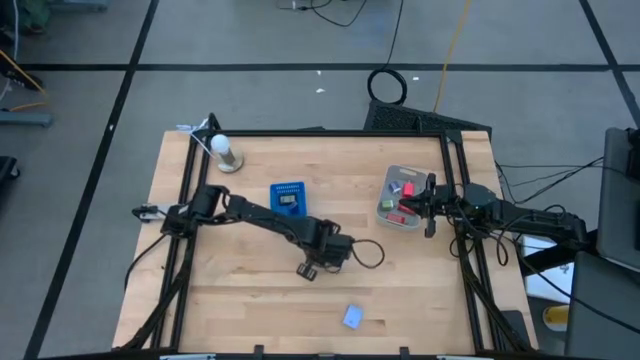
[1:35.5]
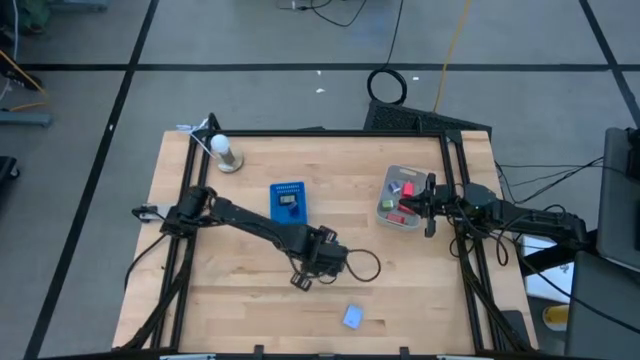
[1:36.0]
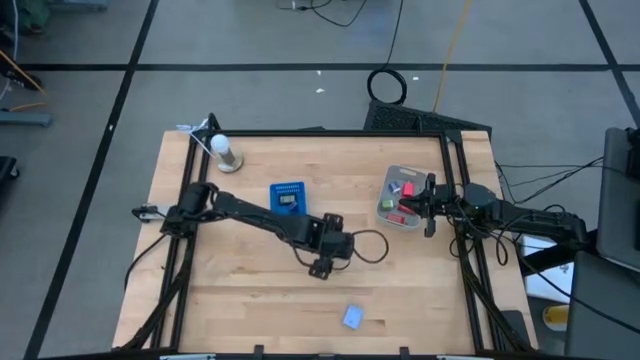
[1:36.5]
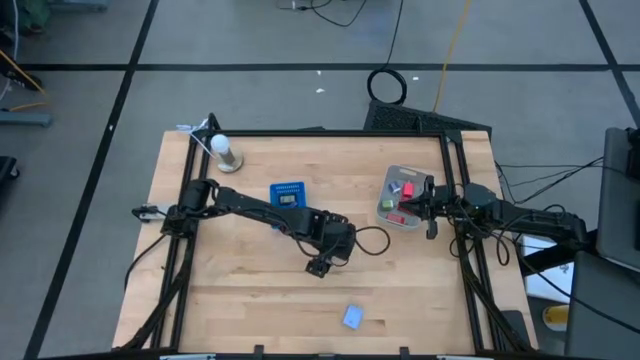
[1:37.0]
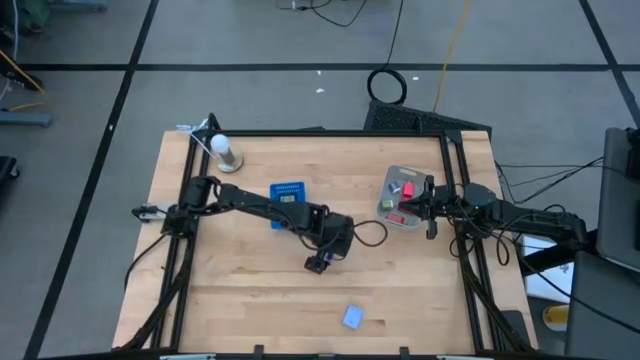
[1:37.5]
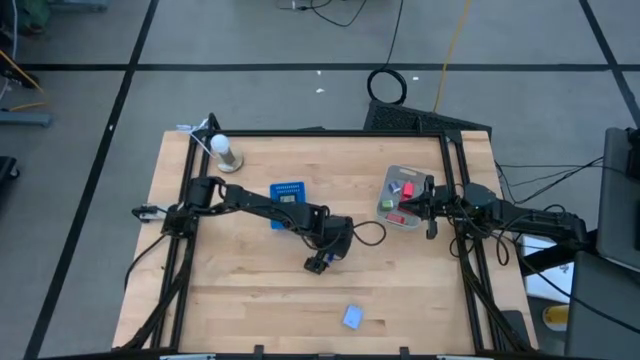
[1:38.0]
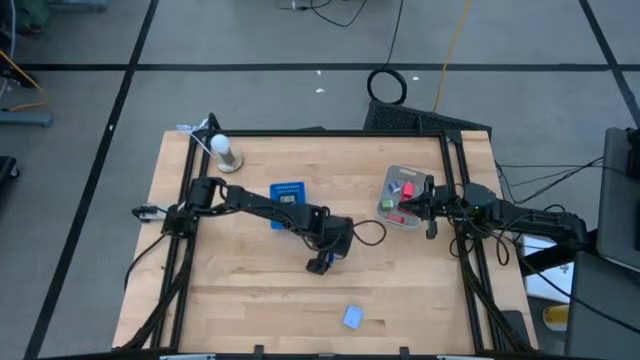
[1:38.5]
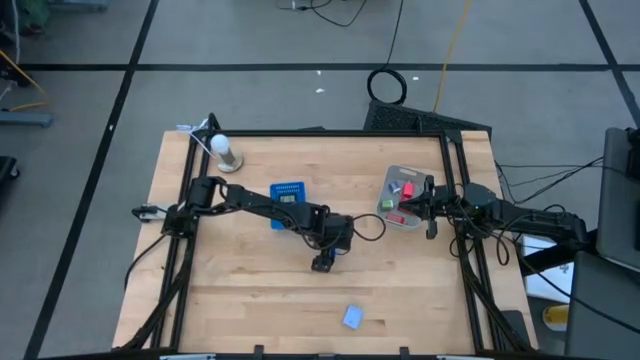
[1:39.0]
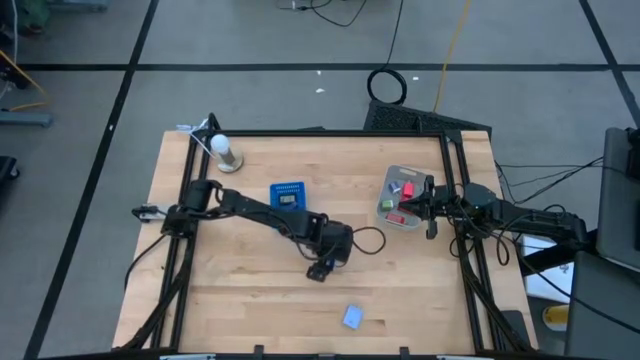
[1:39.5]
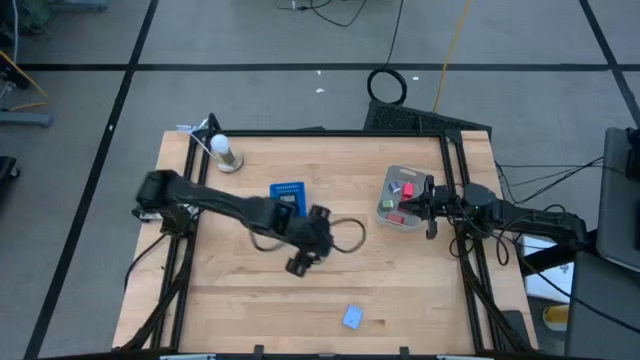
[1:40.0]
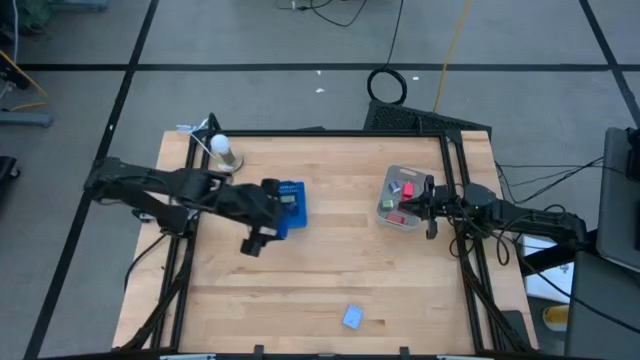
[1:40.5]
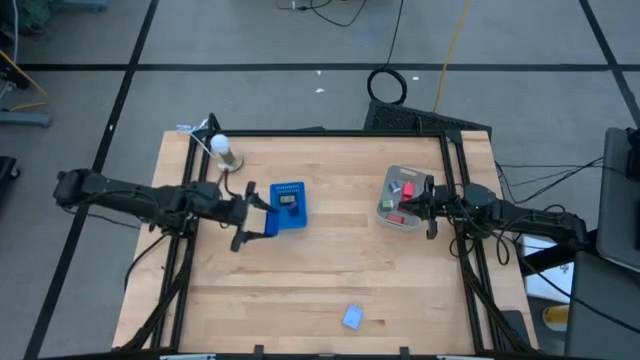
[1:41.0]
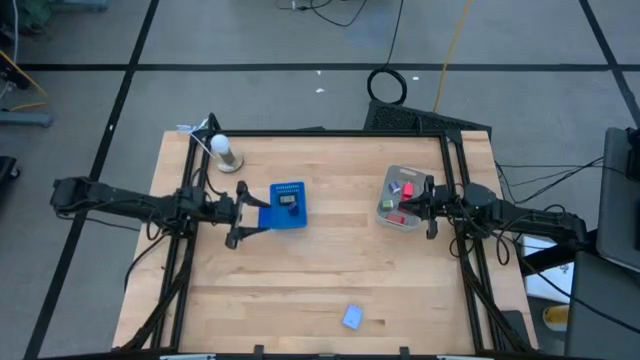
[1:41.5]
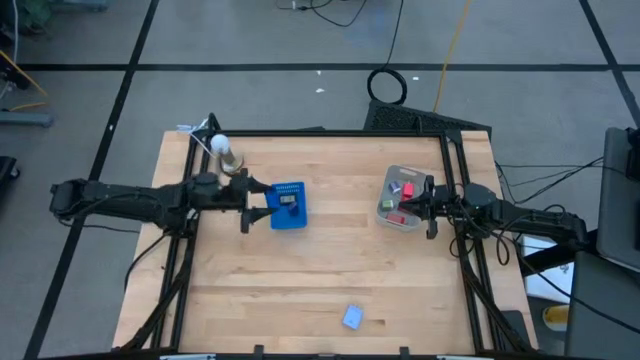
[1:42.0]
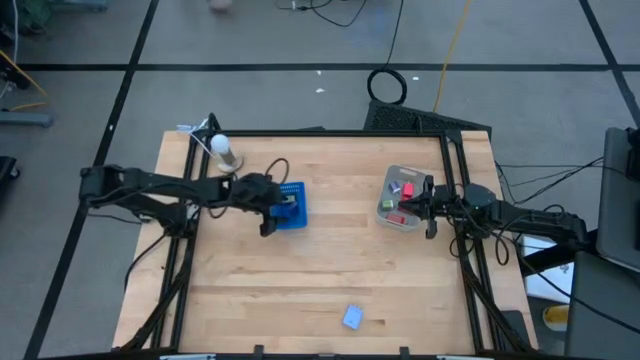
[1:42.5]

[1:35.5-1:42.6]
Task: Pick & Place Office items
Put the blue digital clock into the blue bin

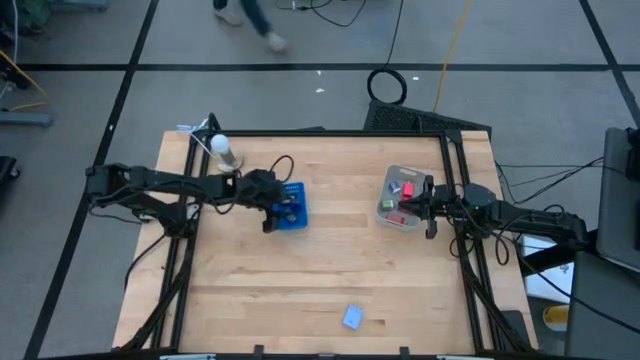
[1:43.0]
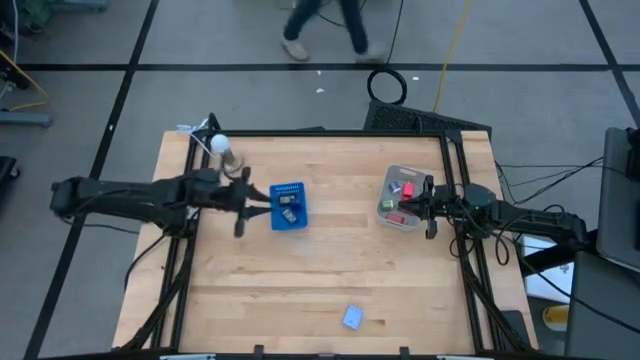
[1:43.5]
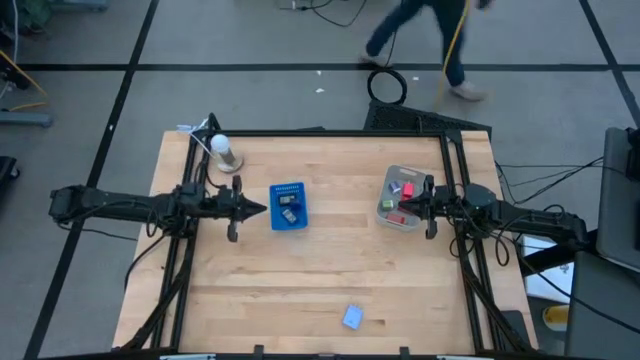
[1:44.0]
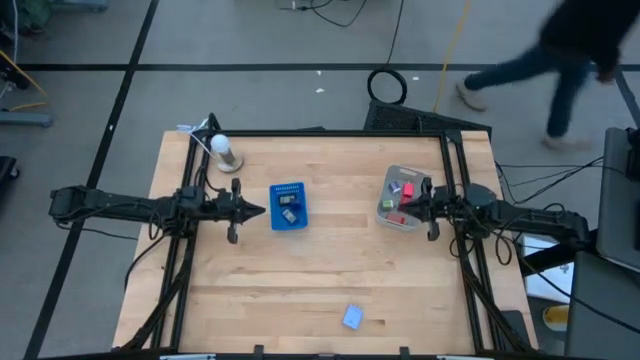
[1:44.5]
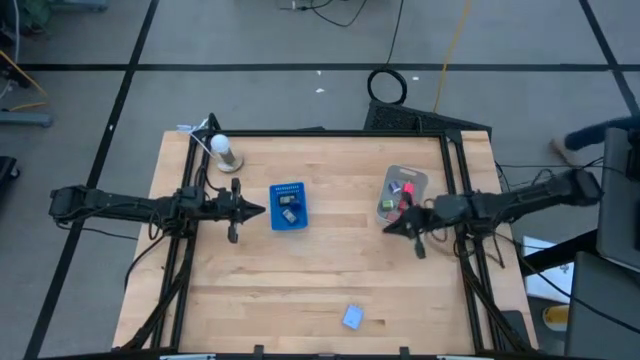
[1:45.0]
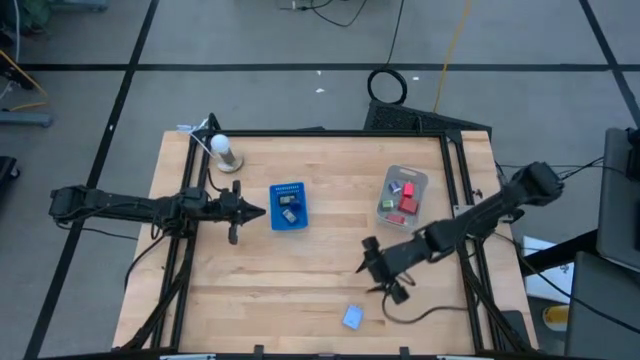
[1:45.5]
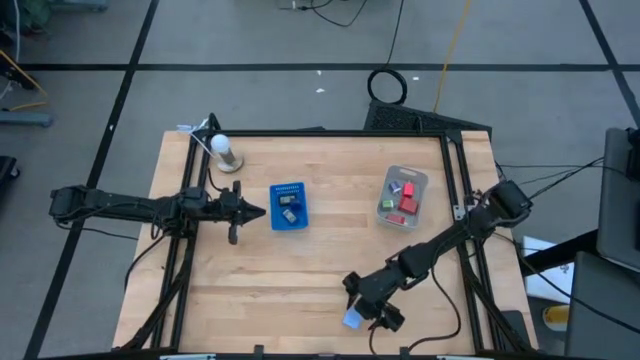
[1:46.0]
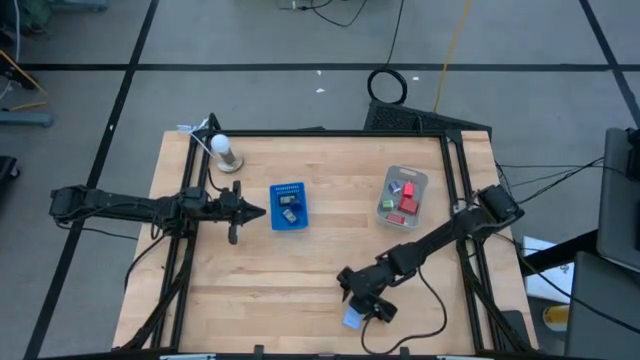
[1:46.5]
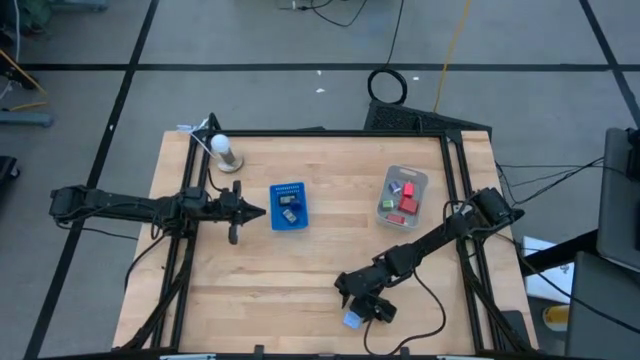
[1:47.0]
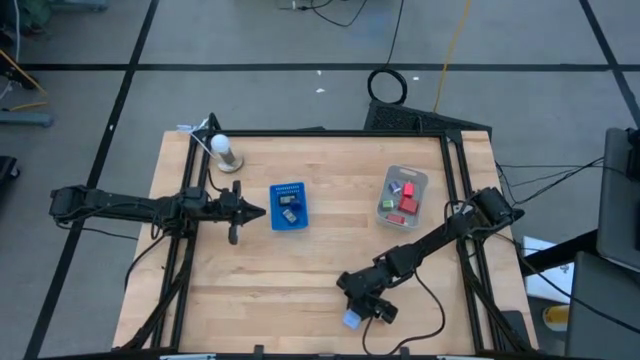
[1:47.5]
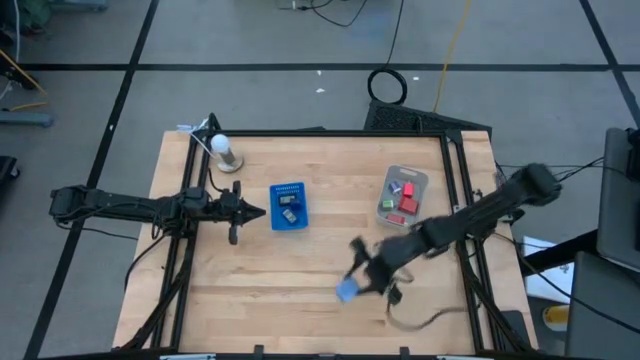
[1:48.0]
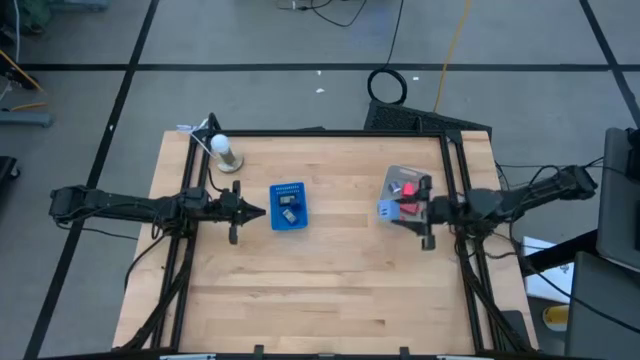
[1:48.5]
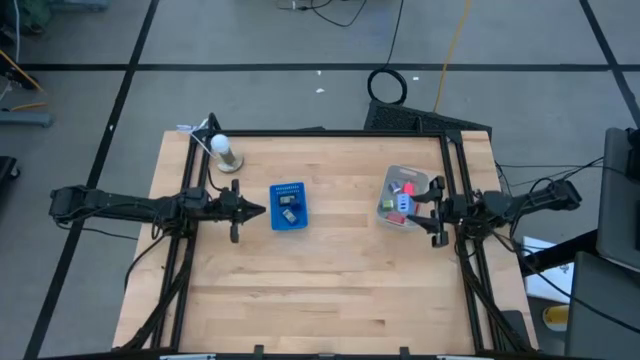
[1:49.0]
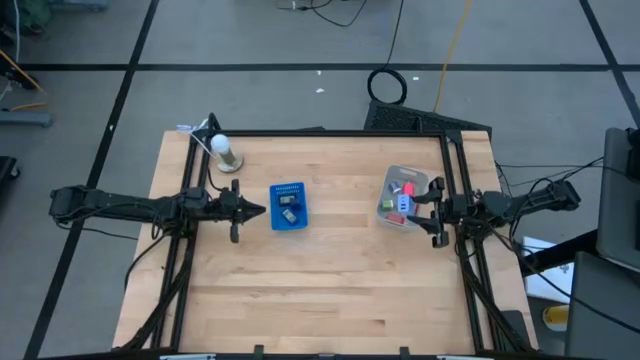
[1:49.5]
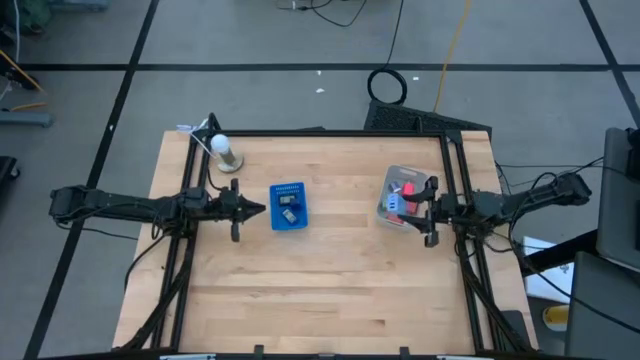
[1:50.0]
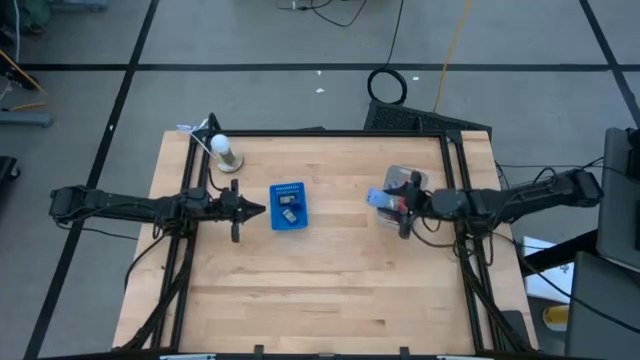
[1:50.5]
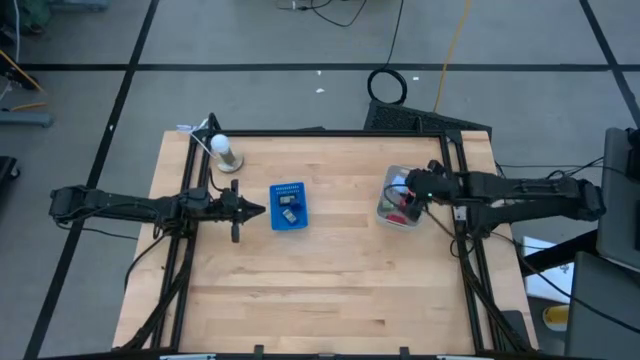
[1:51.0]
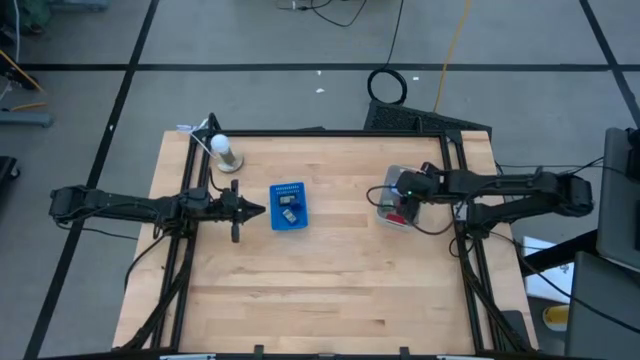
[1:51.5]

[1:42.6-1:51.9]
Put the light blue charger adapter into the white bin

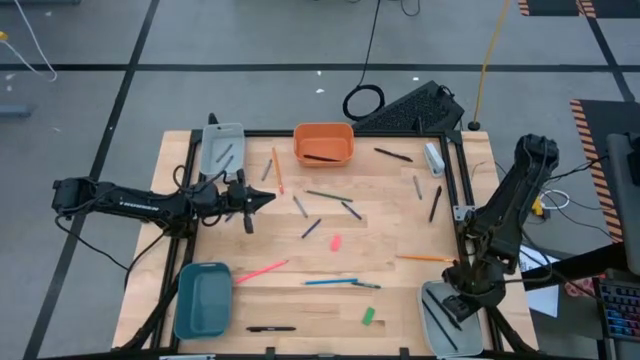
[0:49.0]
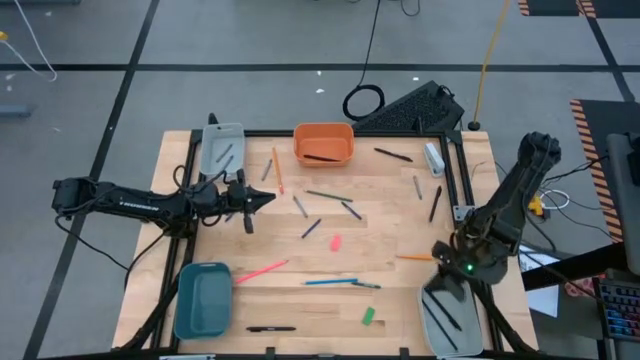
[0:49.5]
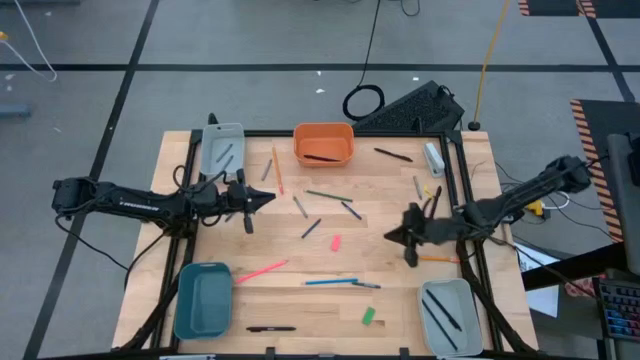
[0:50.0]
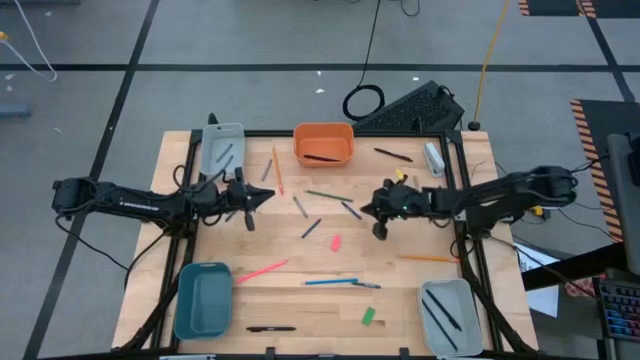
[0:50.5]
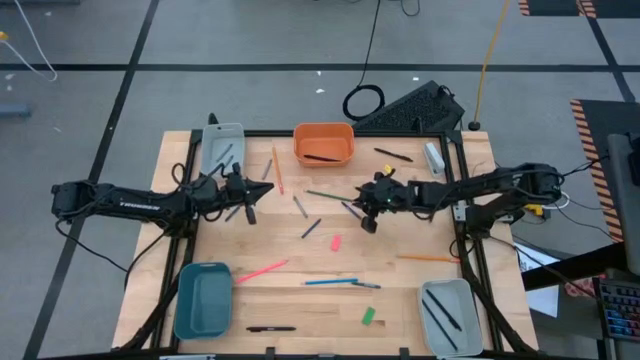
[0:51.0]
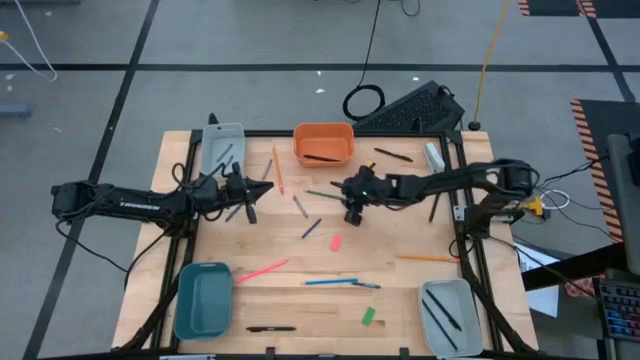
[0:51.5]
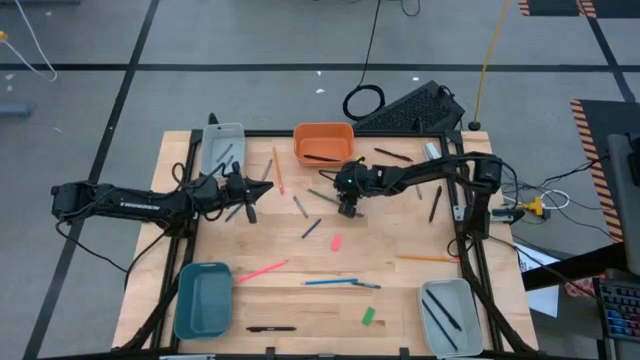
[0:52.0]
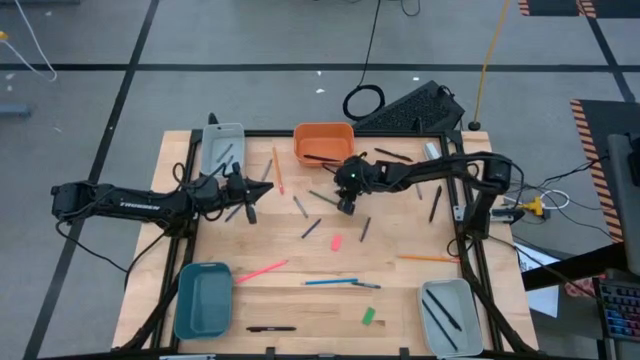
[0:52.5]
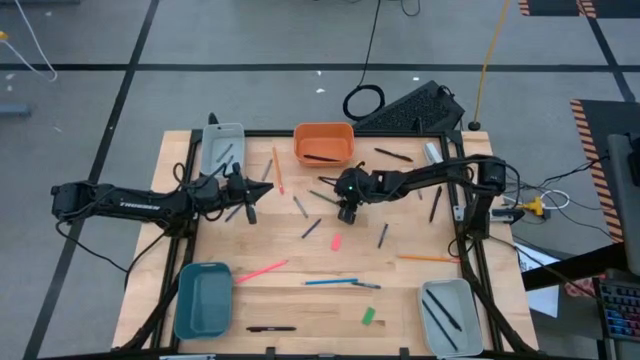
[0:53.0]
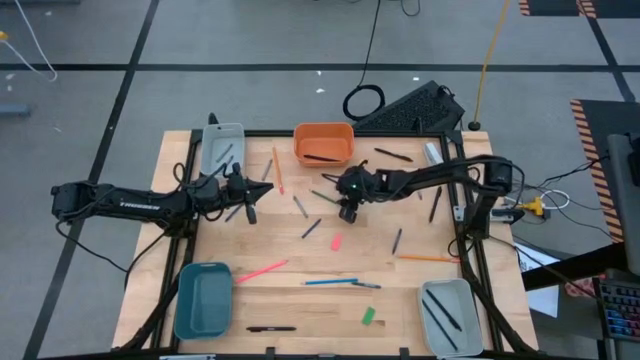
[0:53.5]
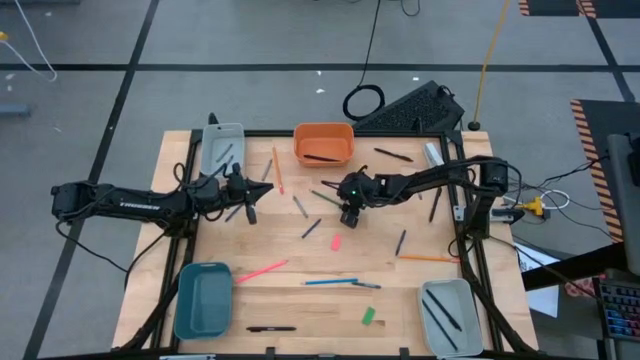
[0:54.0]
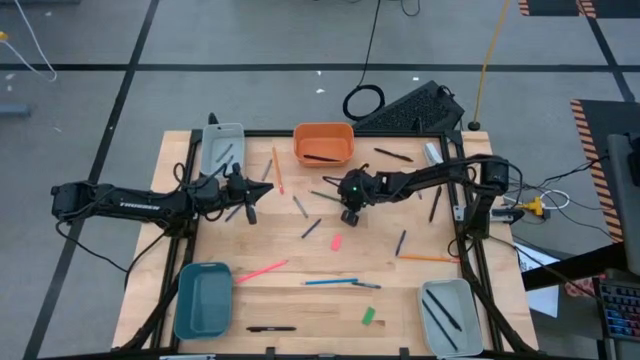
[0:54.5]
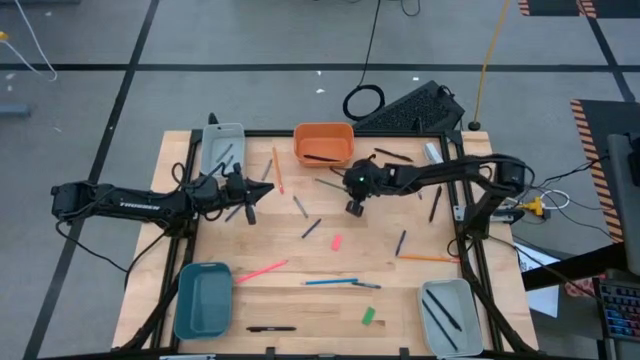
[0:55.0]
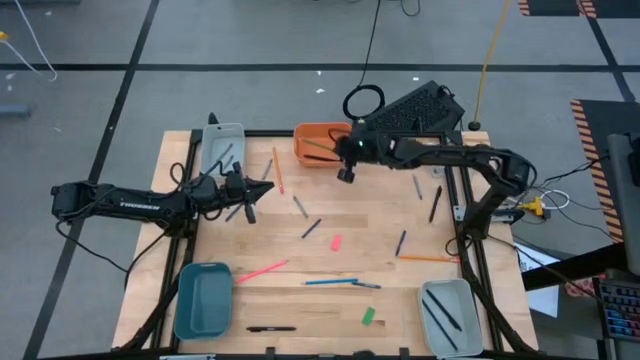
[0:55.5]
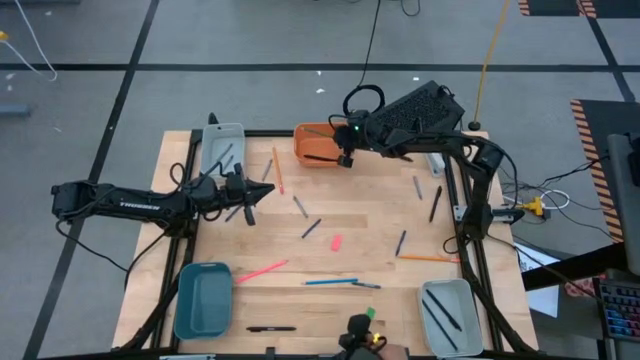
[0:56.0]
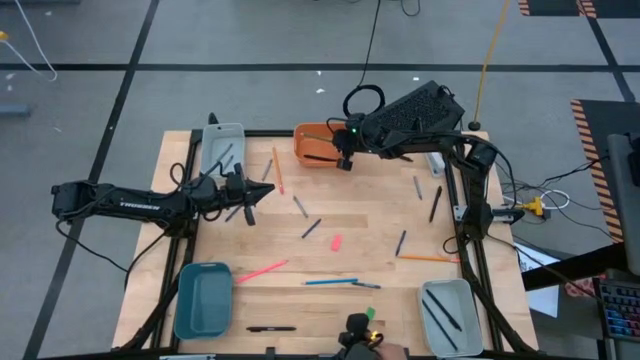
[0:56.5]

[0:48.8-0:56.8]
Task: Sort crayons/erasers/pens/pencils in bins
Put the green pencil into the orange bin
